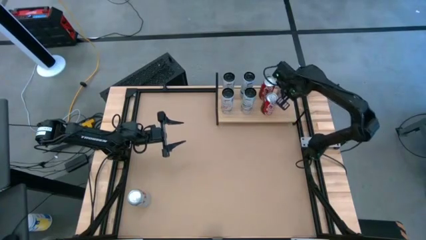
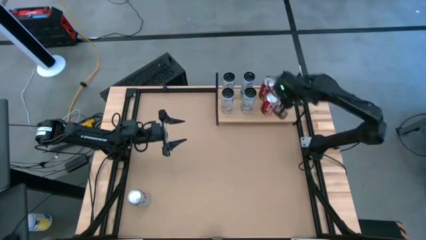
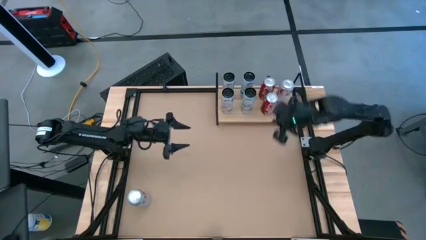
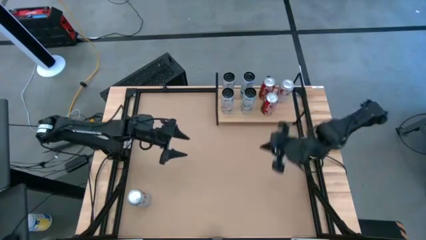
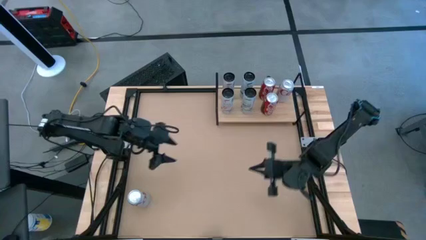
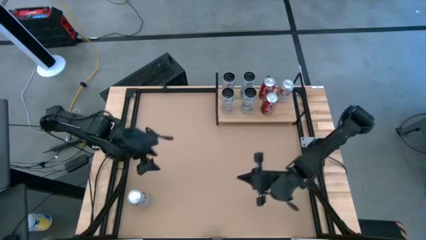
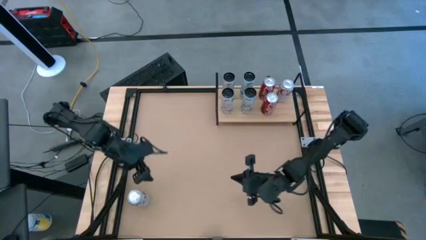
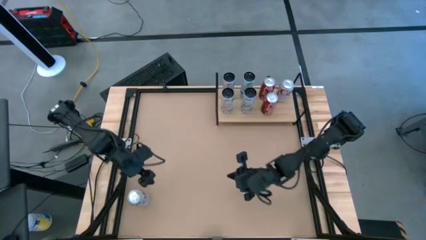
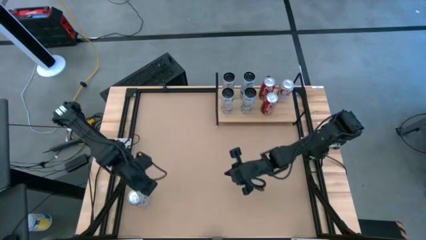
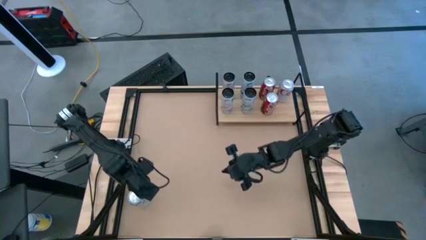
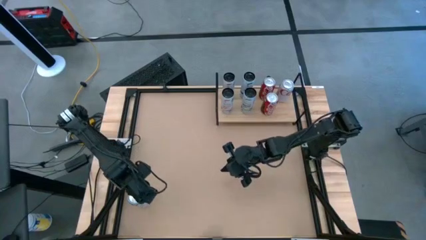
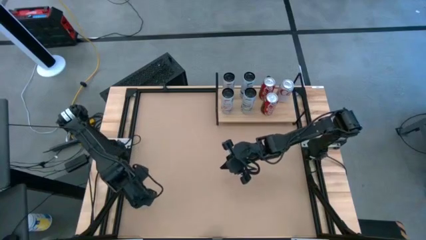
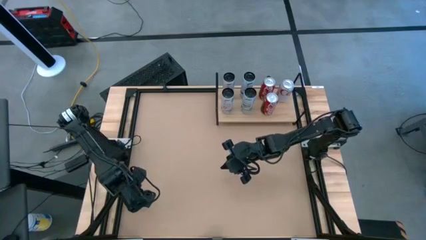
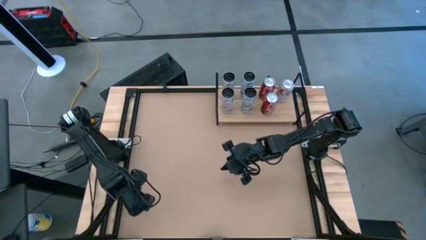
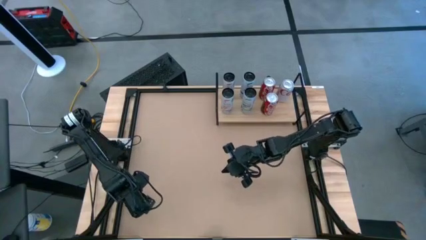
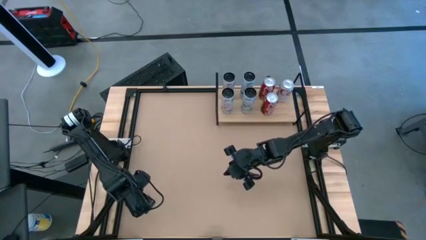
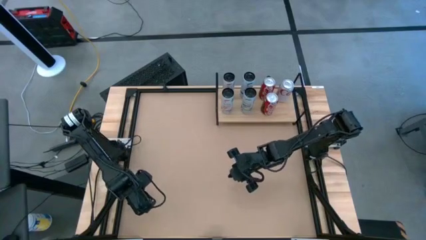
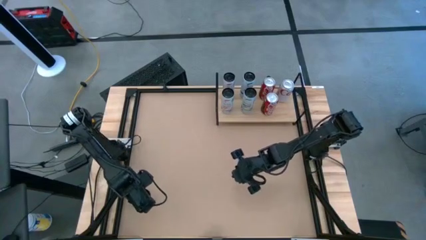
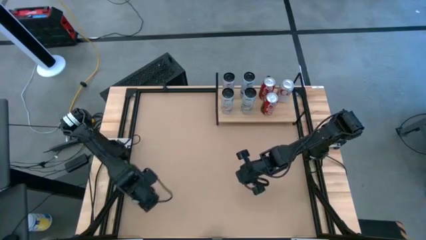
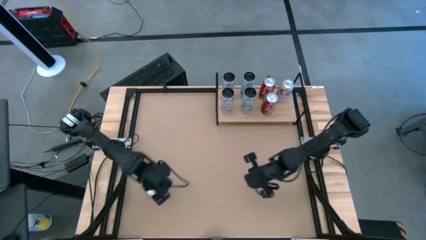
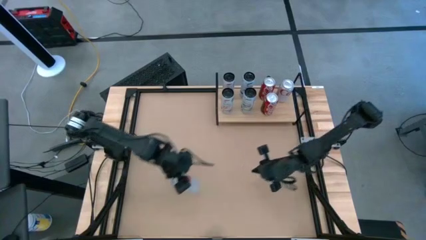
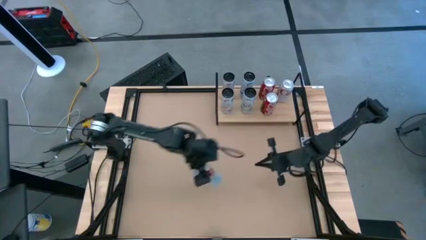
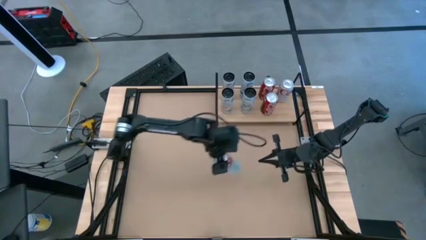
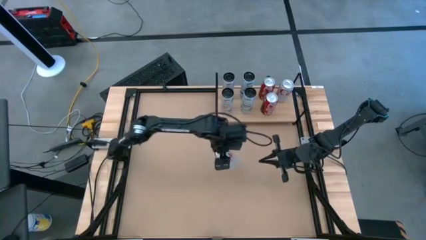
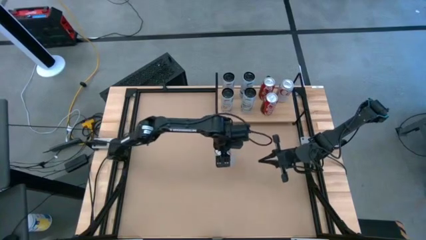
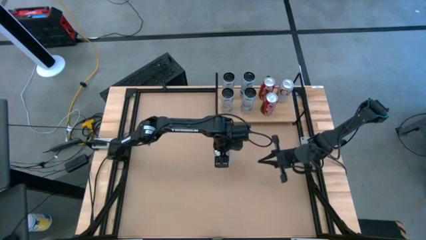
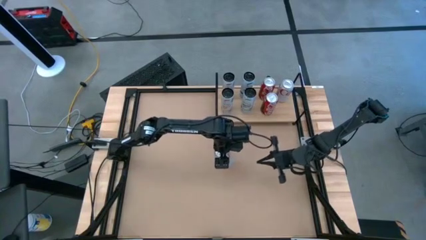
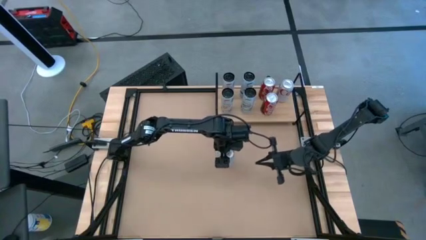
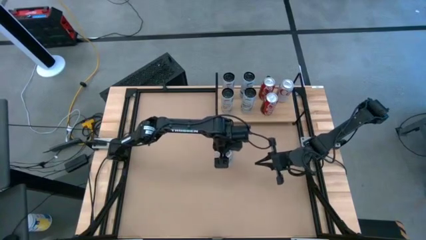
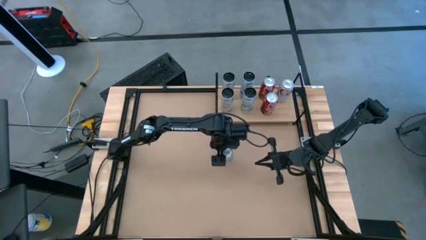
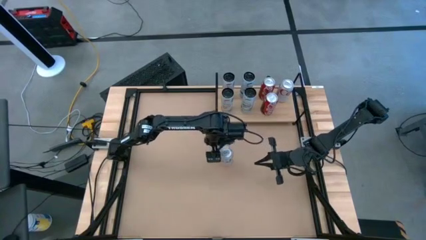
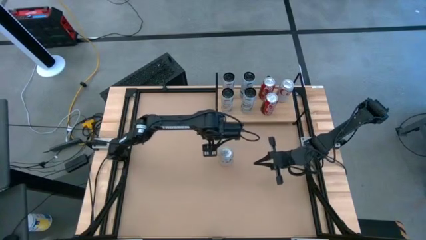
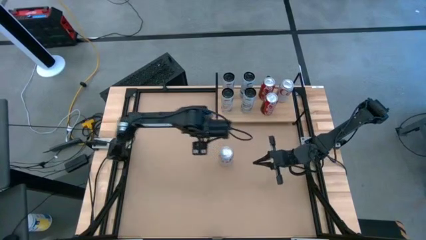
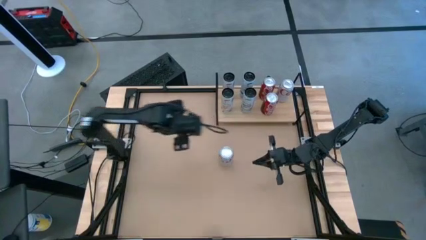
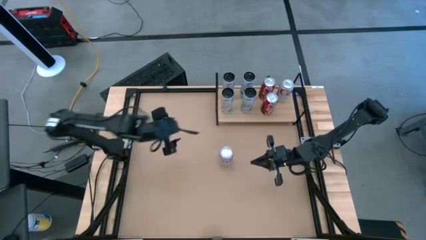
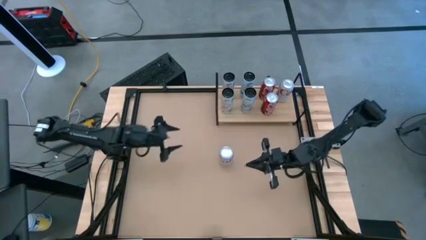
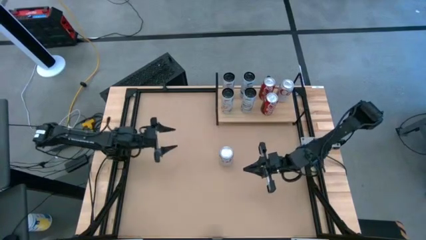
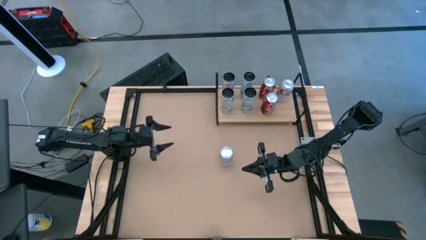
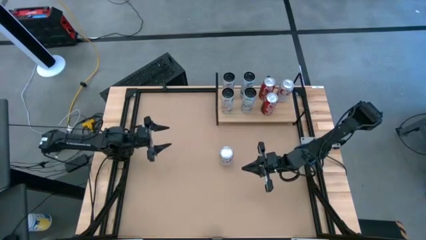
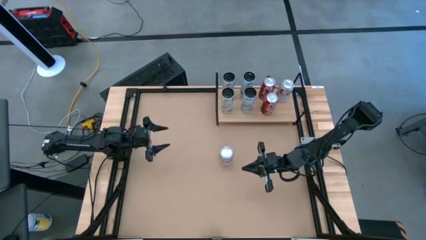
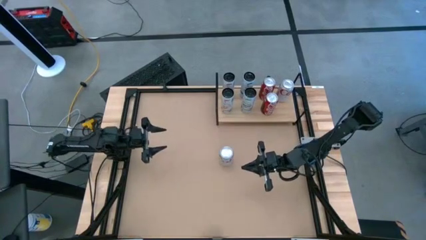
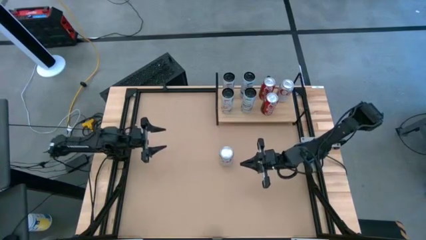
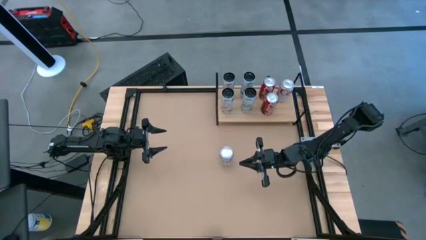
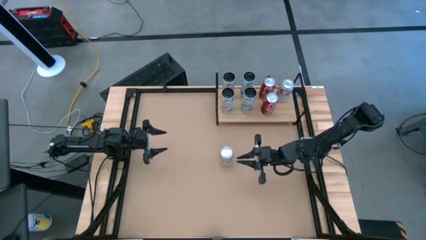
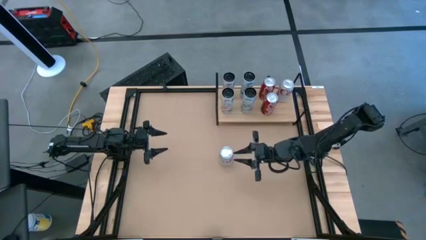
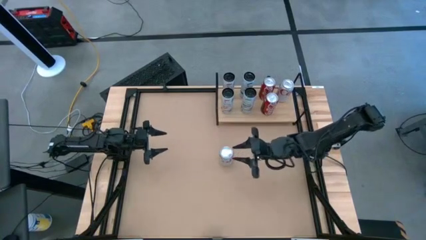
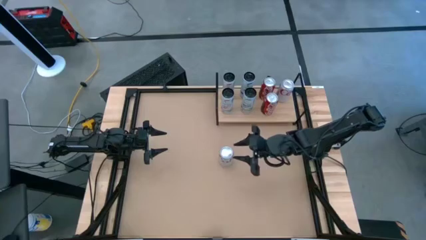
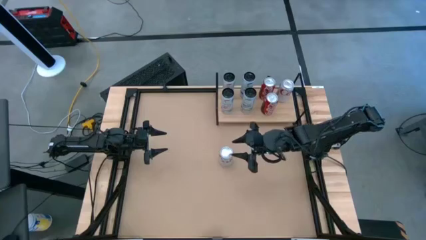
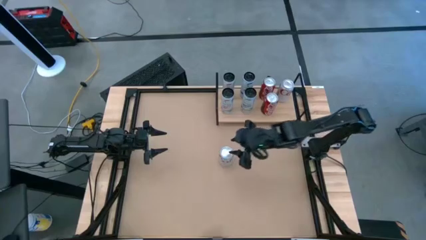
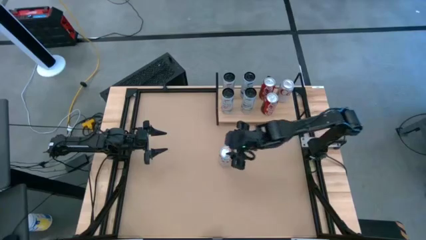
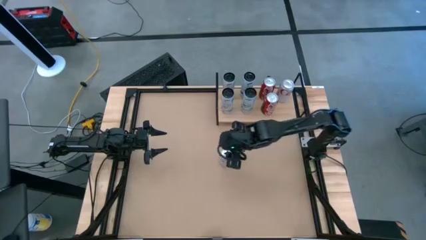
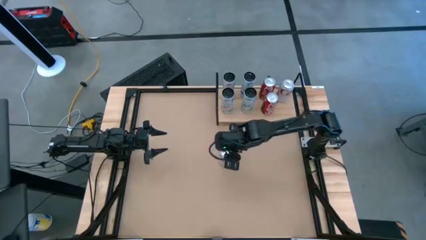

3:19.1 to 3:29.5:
Task: Place canned beverage on shelf
Put the silver soda can on the shelf align with the other silver soda can

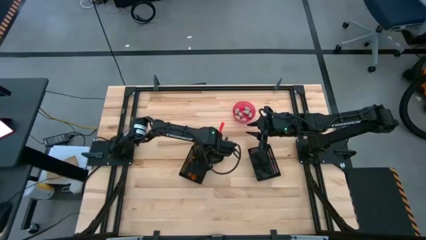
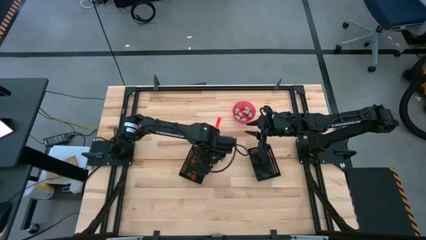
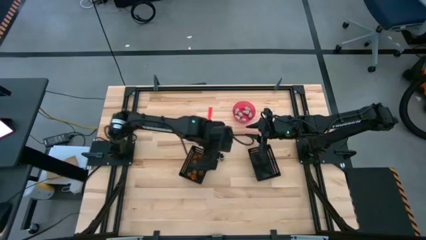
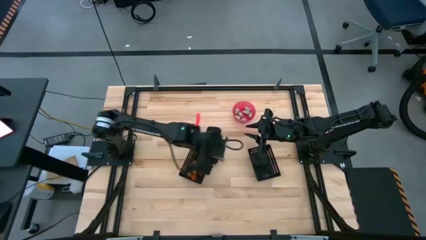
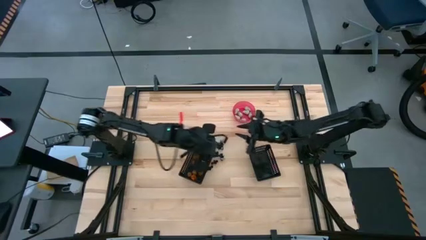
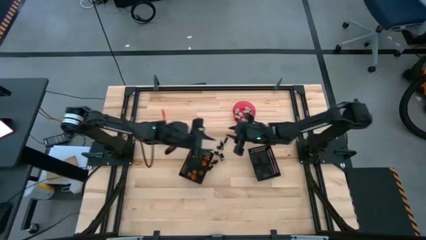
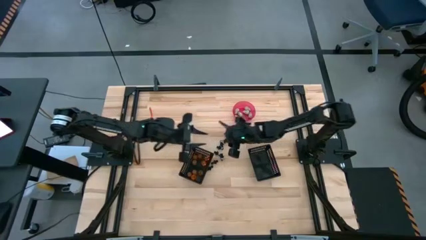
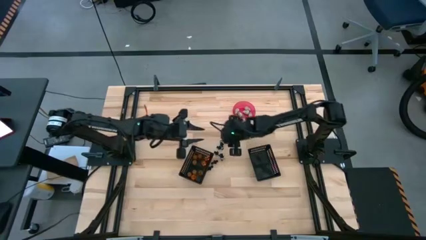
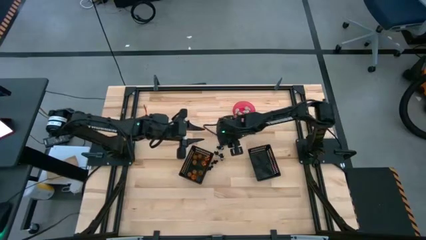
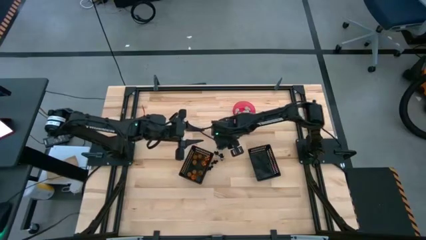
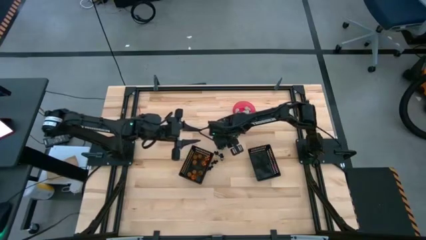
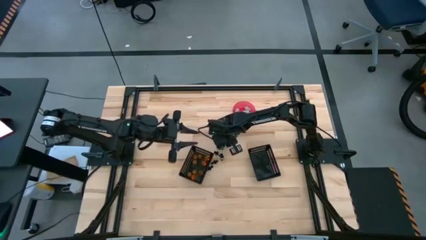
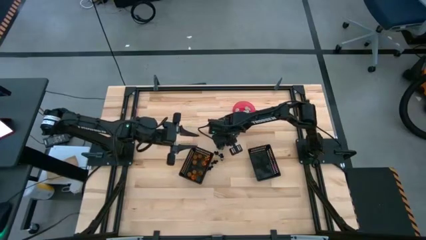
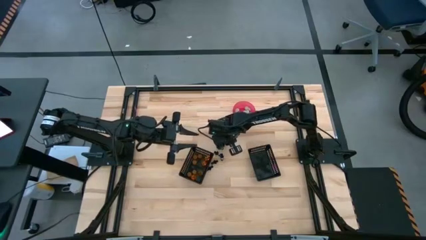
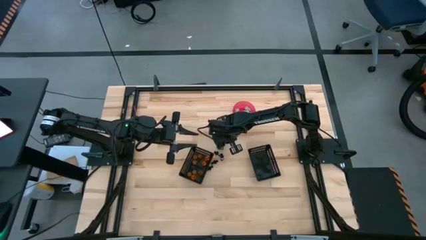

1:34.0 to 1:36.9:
Task: Sort Halloween decoration
Put the black skeleton toy into the right black bin

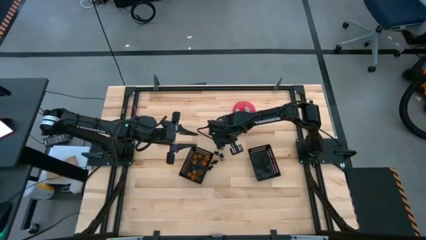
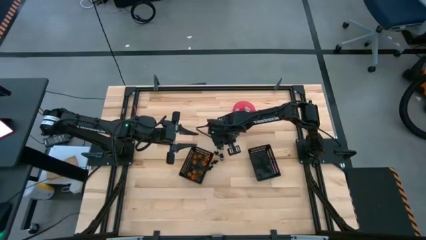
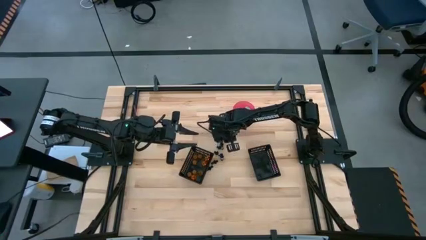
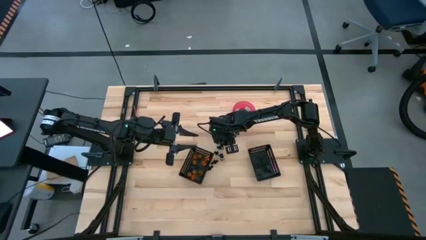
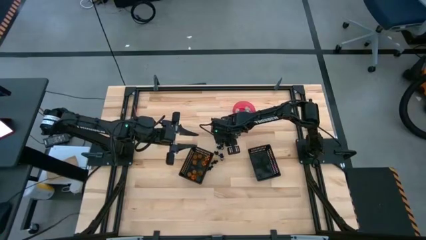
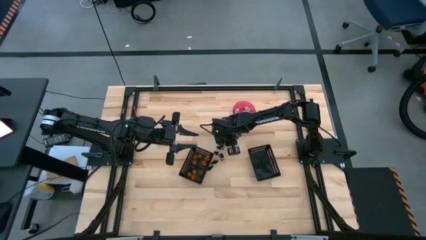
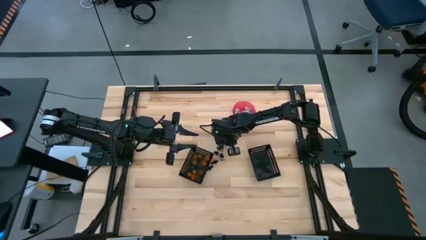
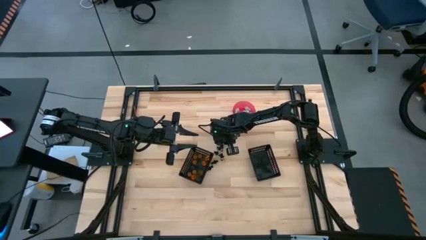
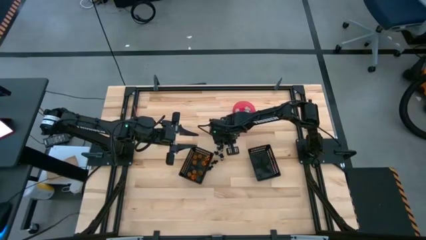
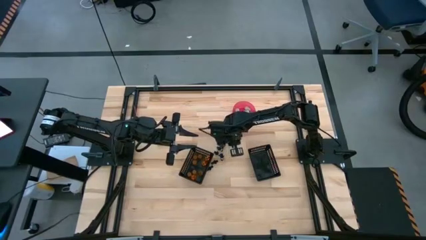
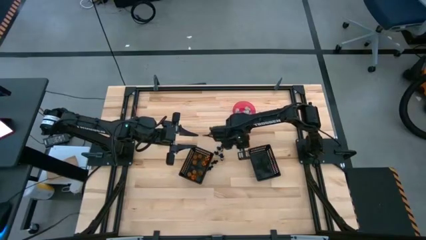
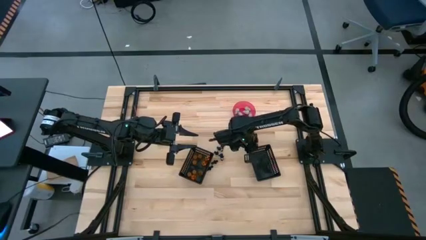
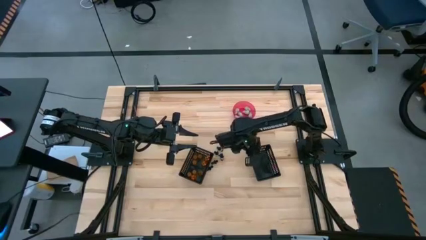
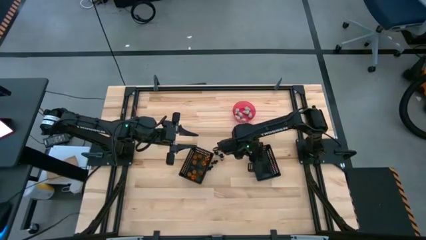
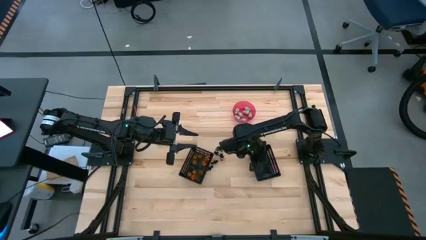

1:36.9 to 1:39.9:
Put the black skeleton toy into the right black bin

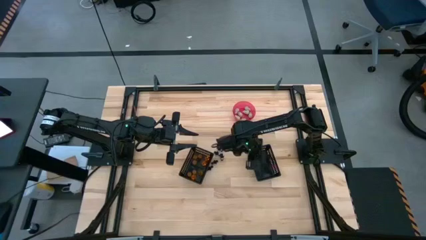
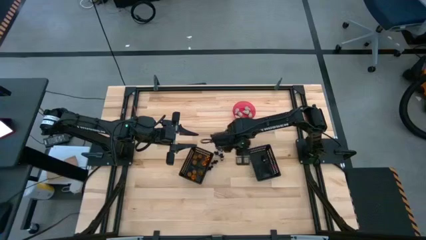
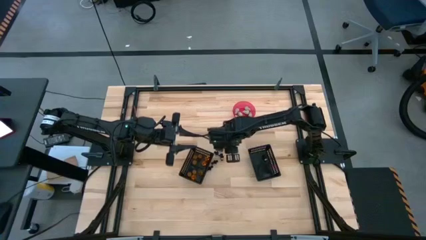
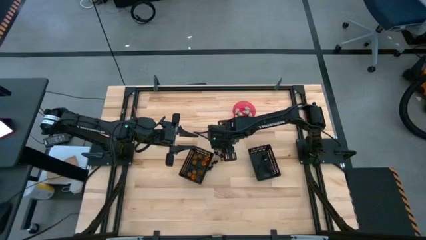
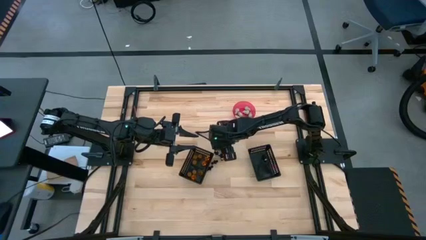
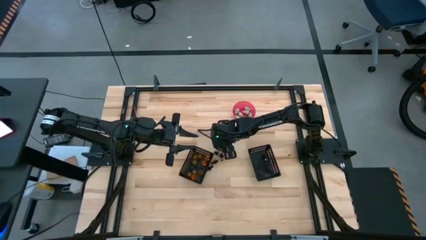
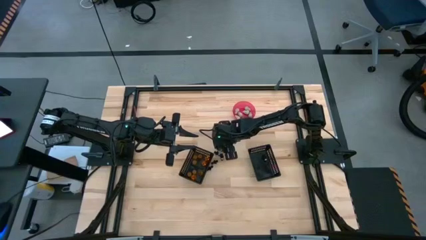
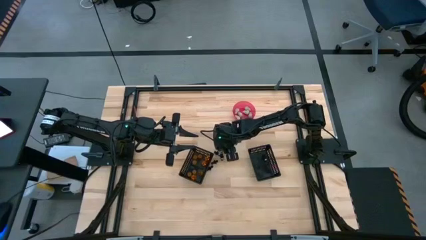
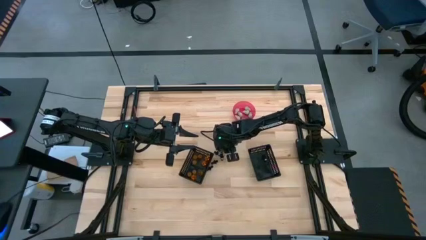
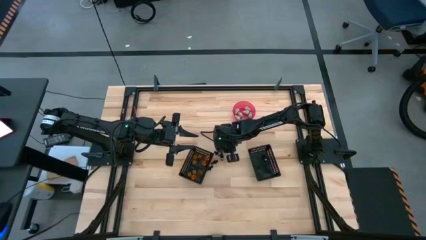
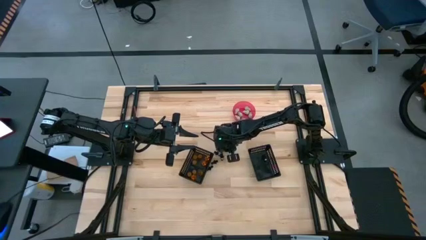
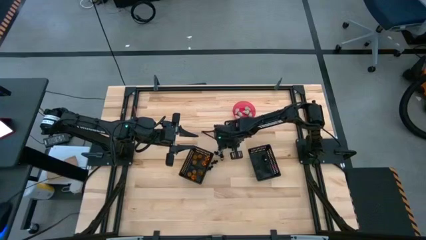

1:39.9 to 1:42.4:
Put the black skeleton toy into the right black bin
